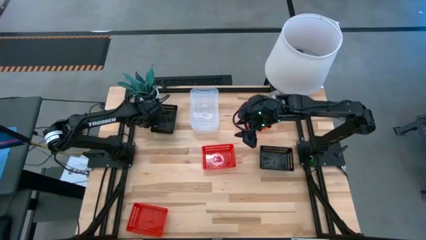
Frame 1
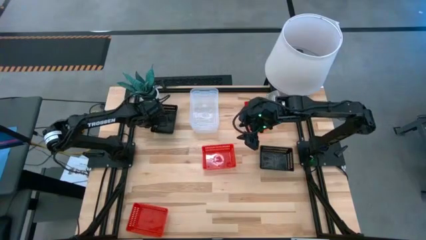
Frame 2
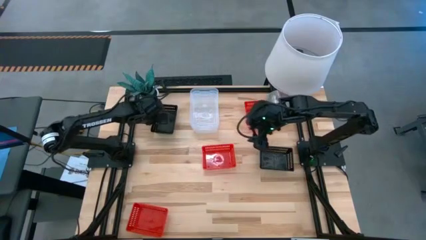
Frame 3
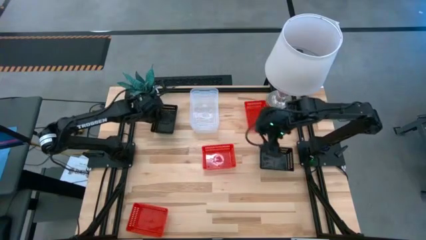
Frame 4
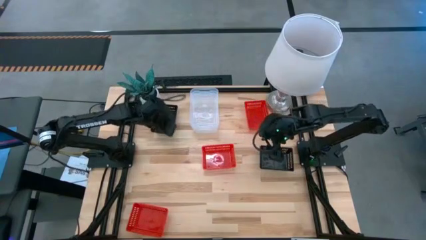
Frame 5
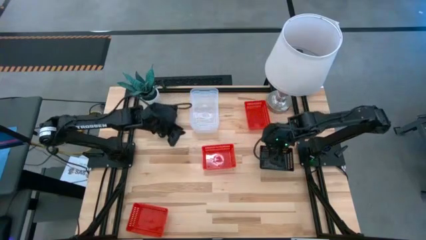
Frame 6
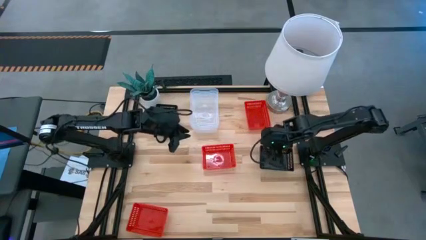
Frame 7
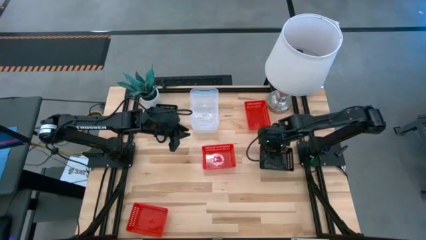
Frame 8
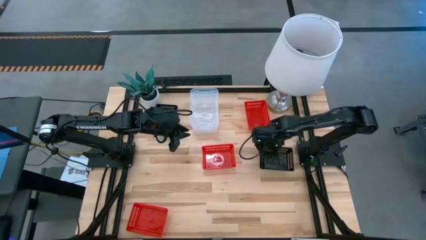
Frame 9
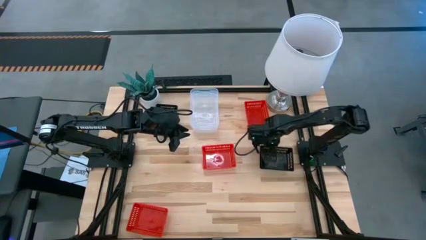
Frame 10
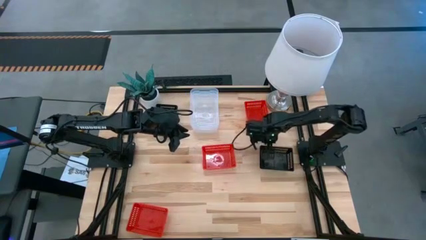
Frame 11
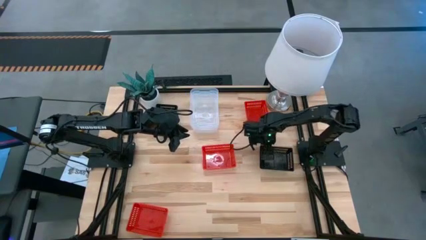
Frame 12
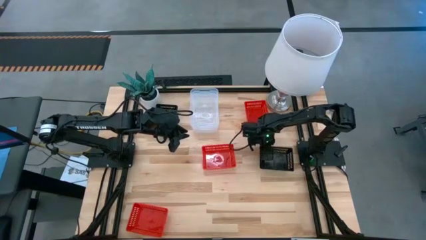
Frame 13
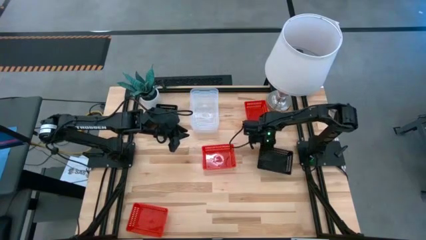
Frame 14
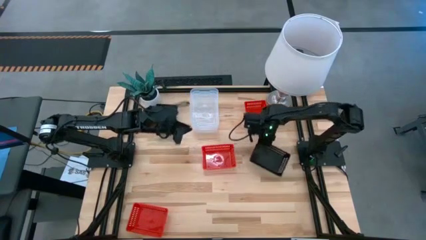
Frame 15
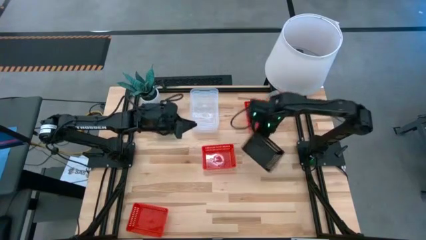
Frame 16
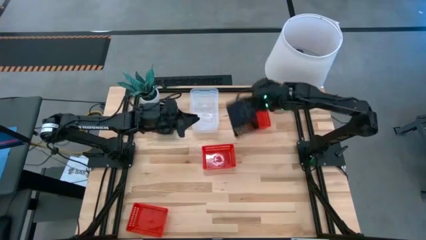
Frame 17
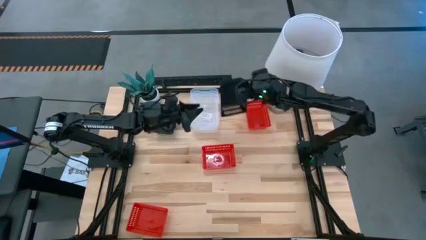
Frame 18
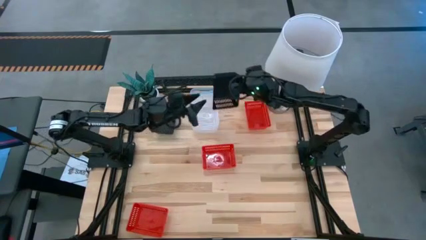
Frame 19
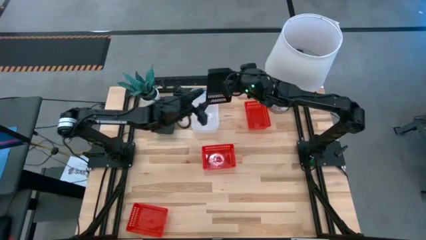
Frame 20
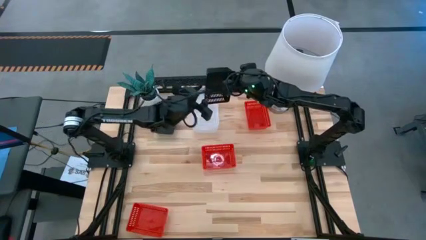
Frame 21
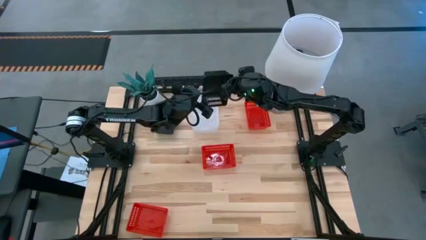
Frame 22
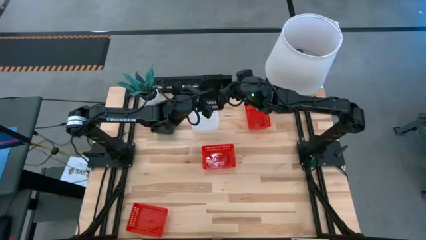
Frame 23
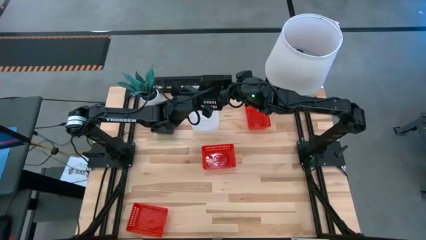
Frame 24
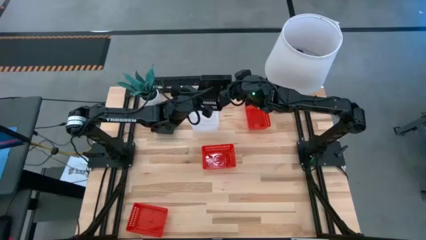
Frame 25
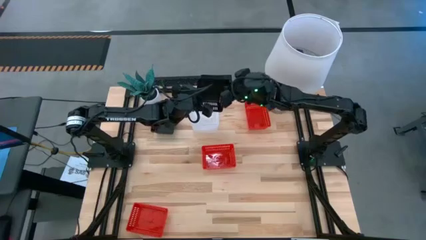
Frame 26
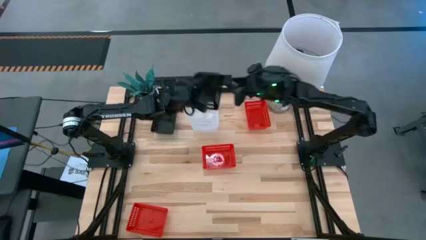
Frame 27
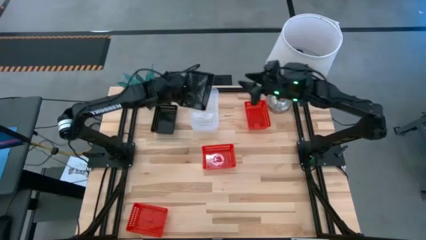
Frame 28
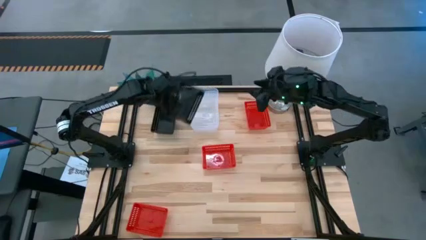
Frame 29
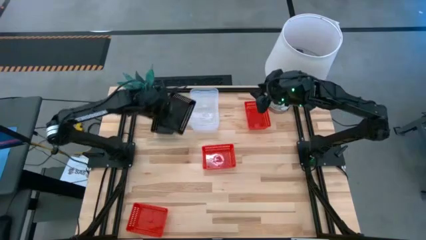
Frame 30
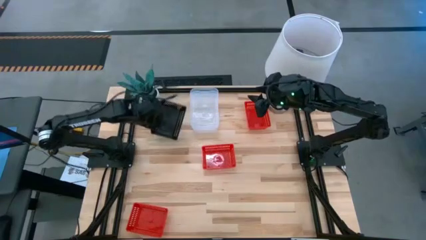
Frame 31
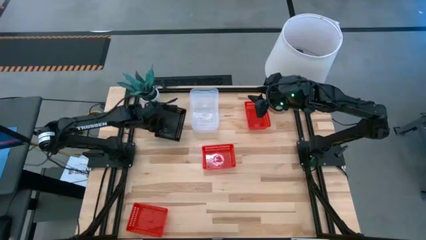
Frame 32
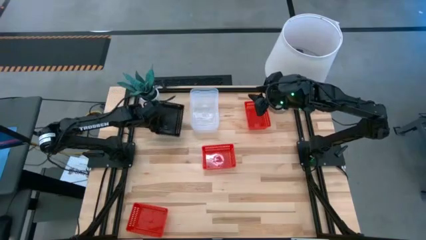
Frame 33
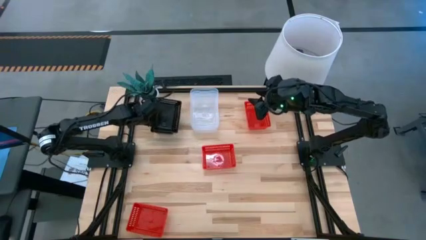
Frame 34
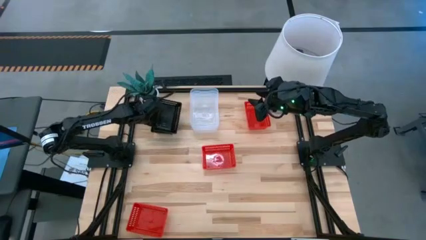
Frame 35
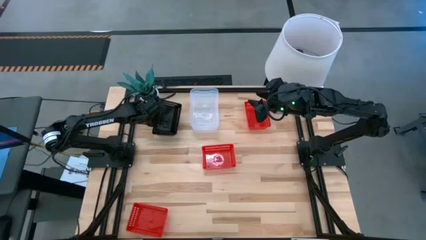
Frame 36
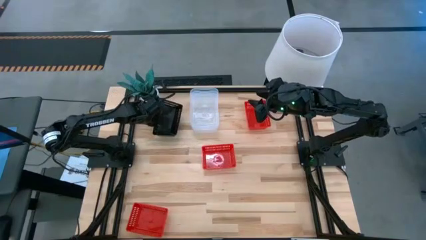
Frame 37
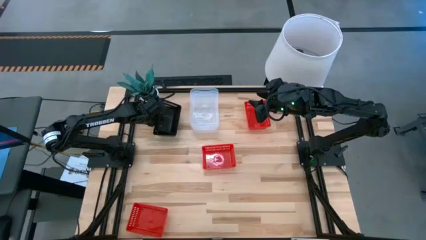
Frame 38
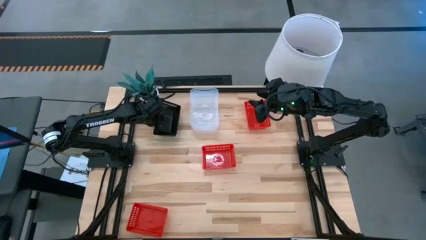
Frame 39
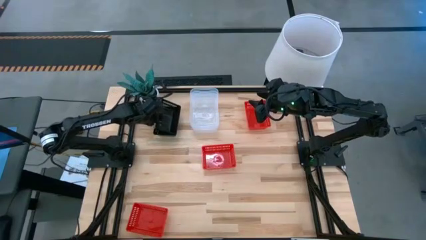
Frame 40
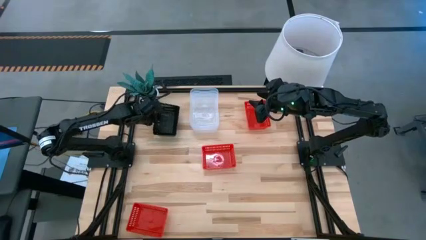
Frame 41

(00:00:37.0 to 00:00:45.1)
Stack the black bin on the stacked black bins

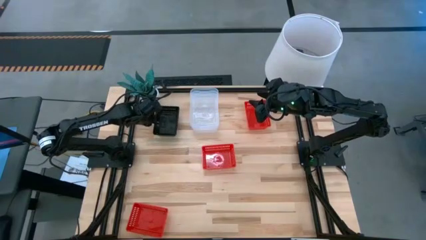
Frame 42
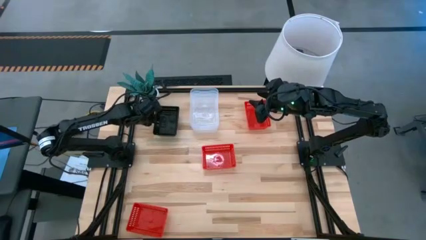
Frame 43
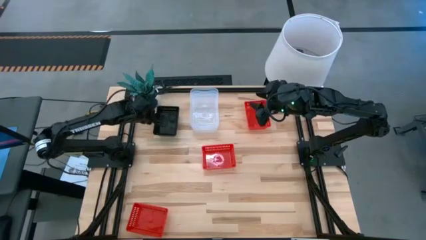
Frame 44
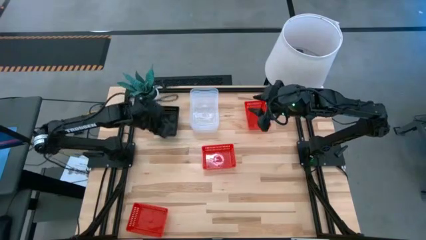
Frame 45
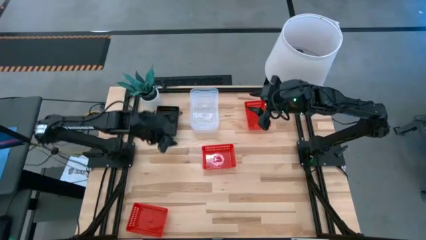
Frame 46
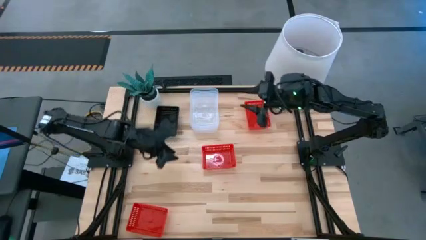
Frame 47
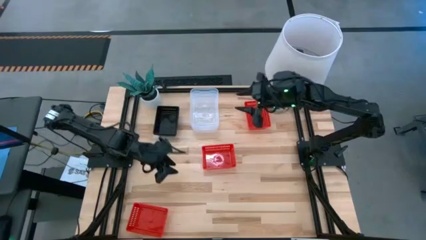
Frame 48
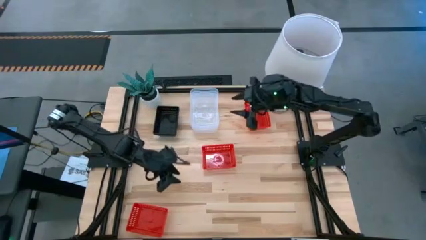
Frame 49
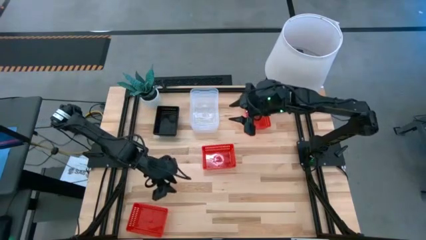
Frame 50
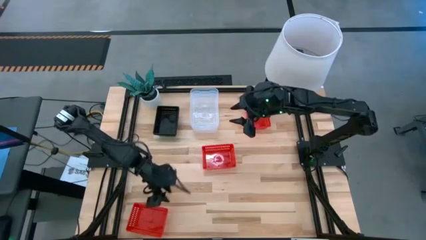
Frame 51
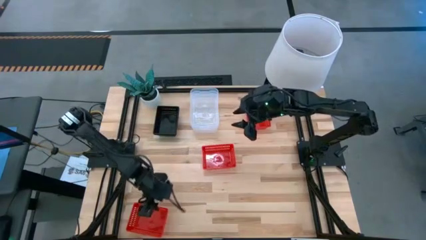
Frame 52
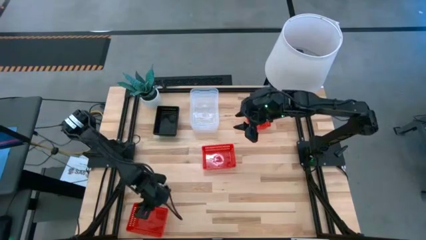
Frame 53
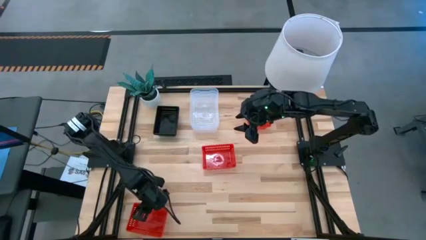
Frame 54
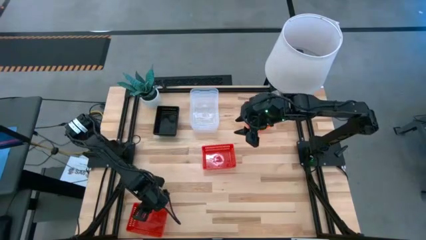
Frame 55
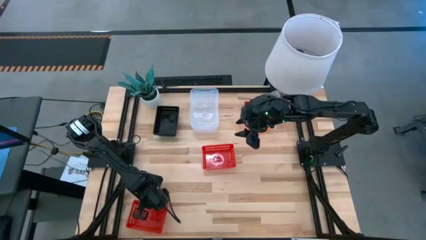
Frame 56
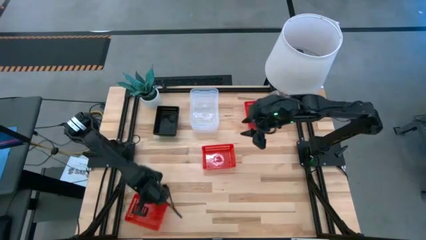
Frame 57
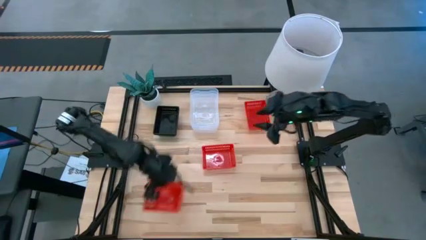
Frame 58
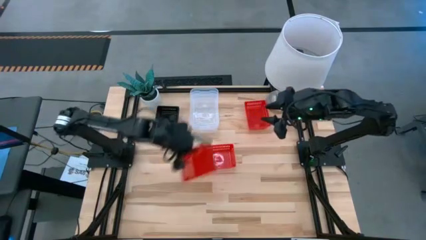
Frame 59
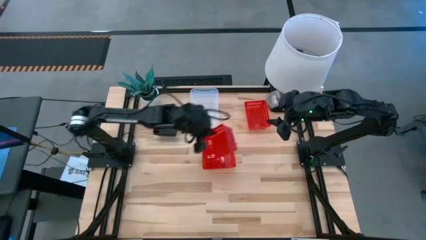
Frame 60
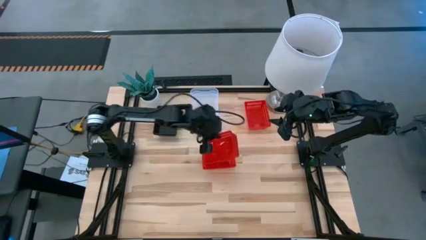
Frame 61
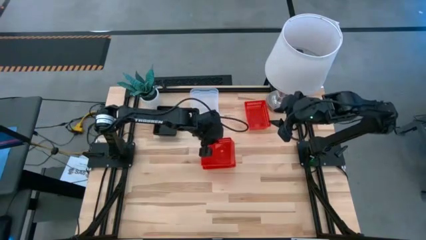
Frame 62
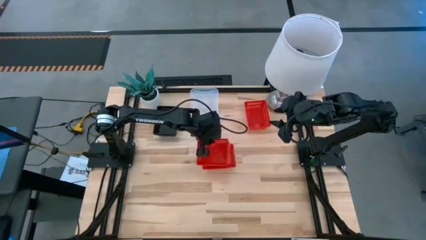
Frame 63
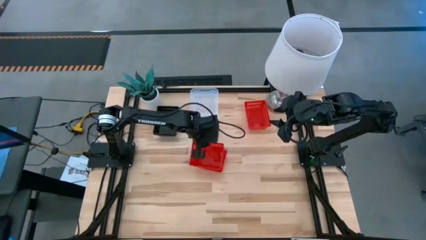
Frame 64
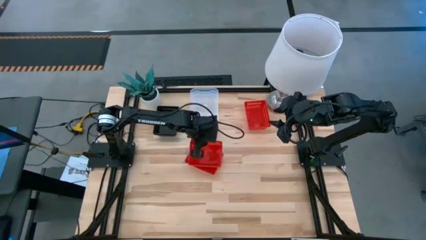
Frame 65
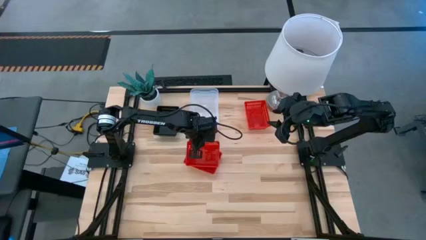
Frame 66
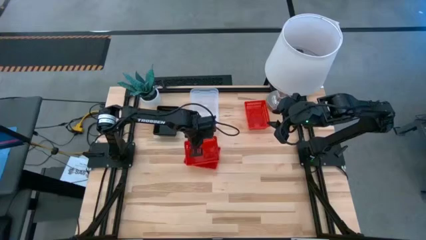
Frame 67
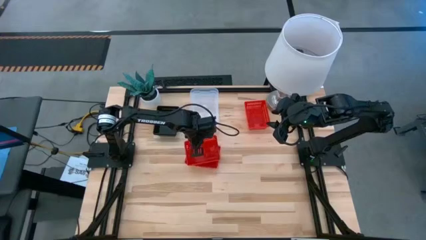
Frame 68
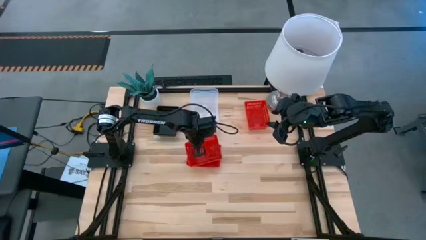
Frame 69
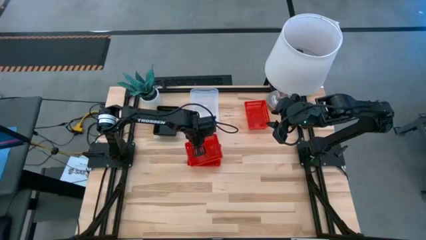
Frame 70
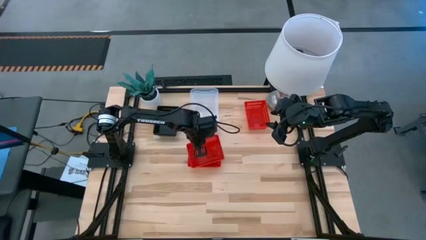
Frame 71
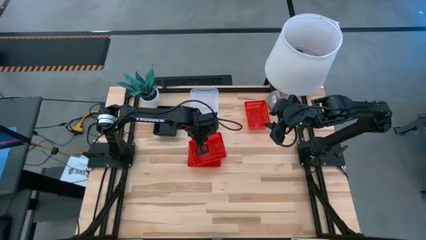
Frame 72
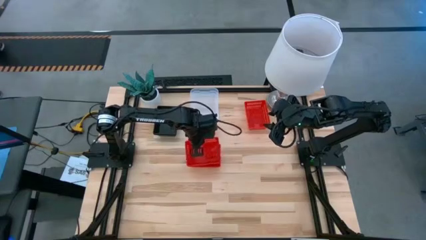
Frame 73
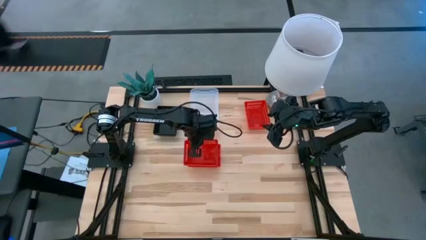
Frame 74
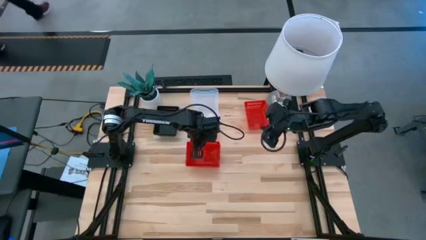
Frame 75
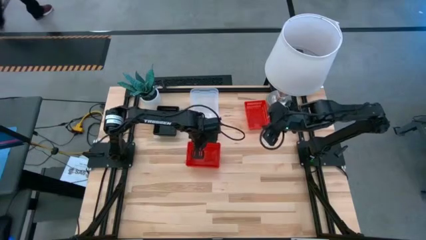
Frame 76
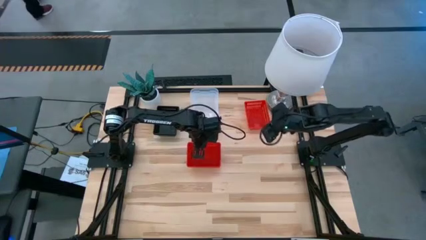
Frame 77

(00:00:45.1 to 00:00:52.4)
Stack the bottom left red bin on the middle red bin

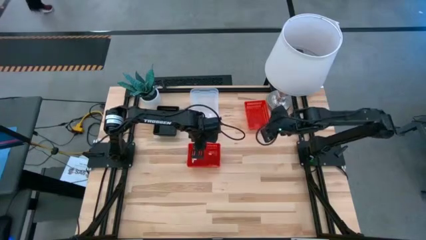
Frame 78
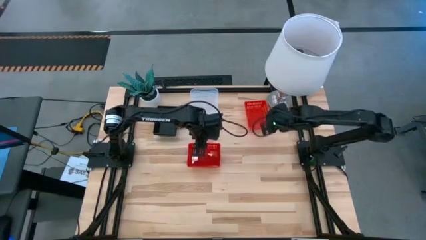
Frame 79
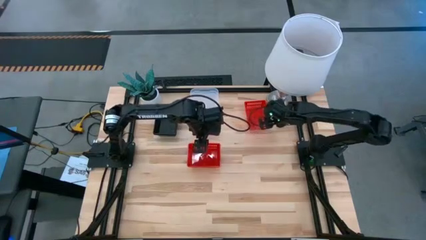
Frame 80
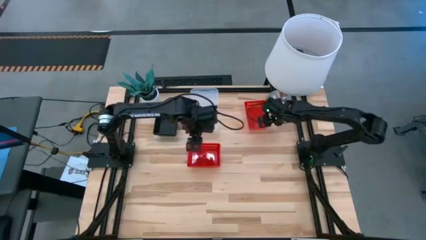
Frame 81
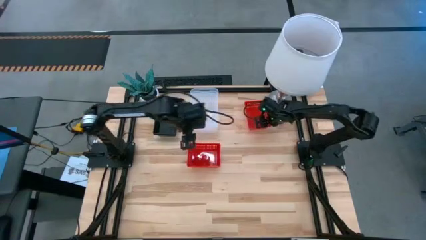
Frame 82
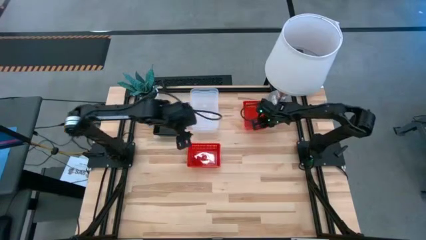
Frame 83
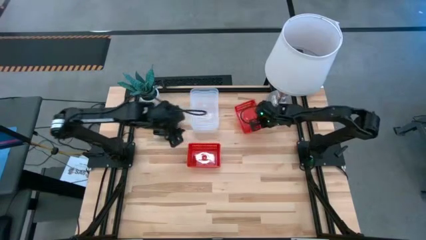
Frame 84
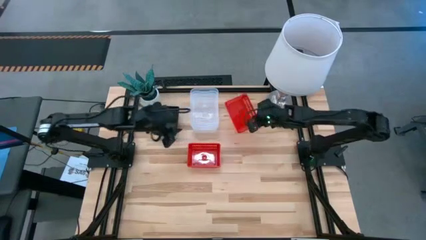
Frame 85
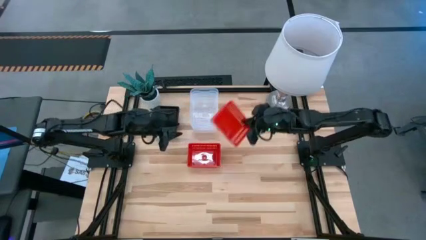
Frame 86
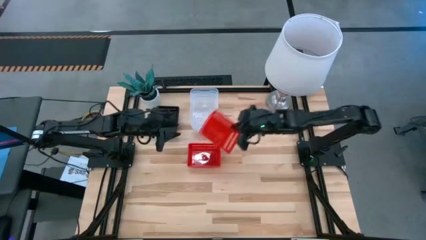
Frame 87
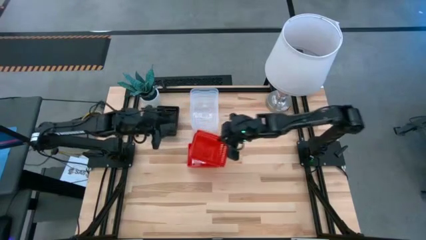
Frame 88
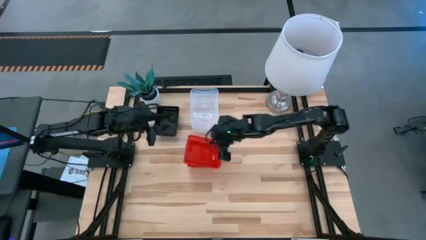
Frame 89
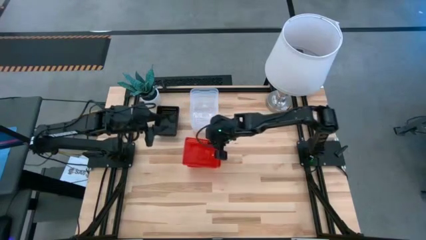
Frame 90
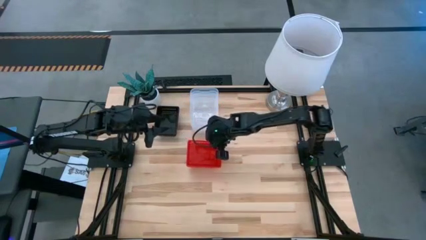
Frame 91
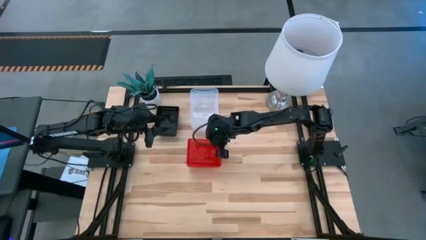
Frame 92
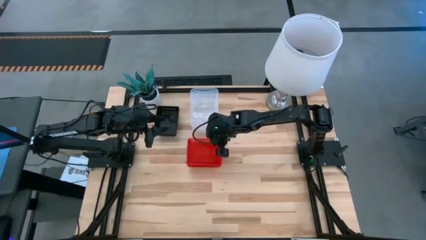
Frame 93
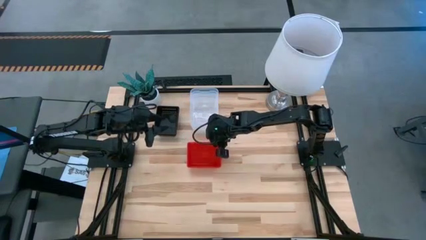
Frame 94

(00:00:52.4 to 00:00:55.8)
Stack the red bin on the stacked red bins
